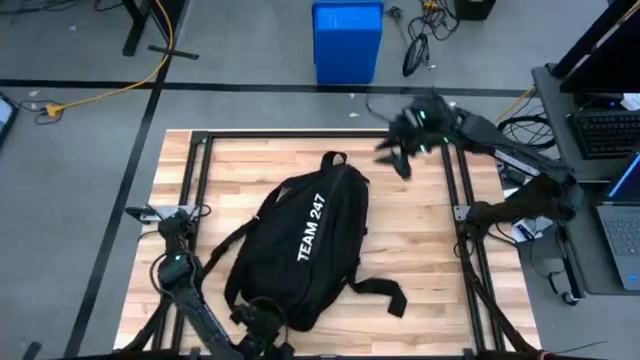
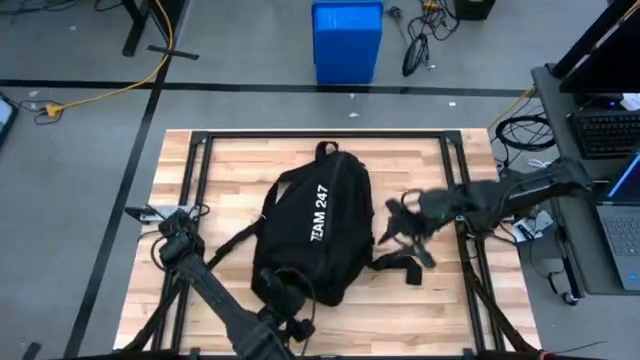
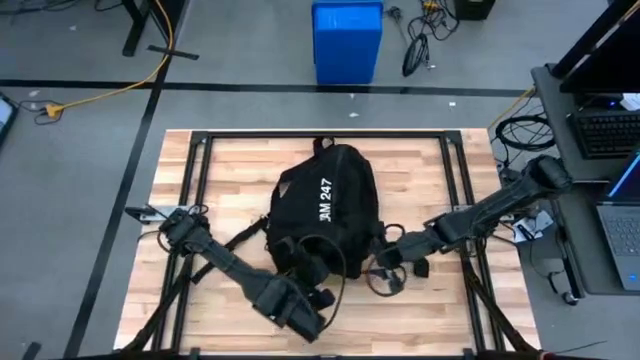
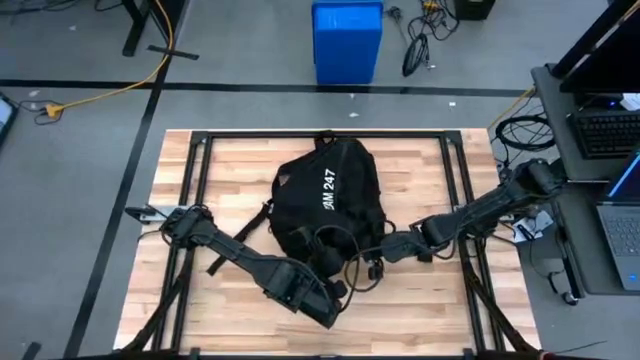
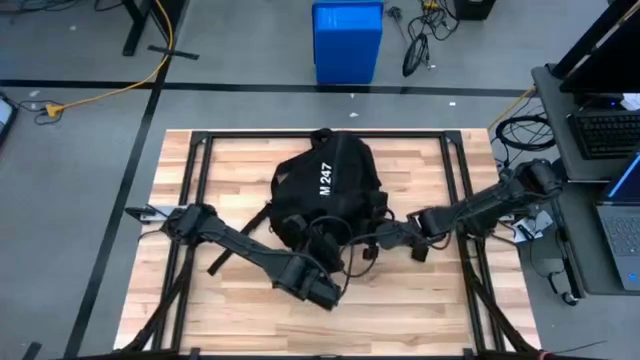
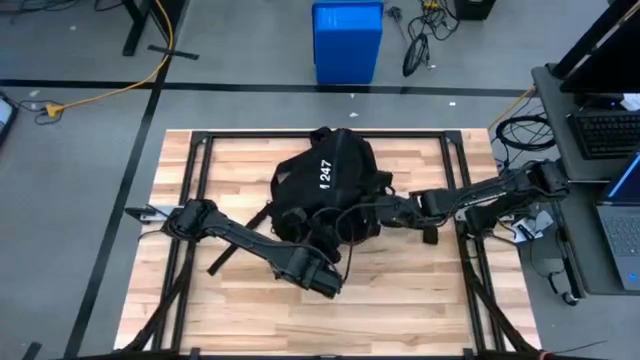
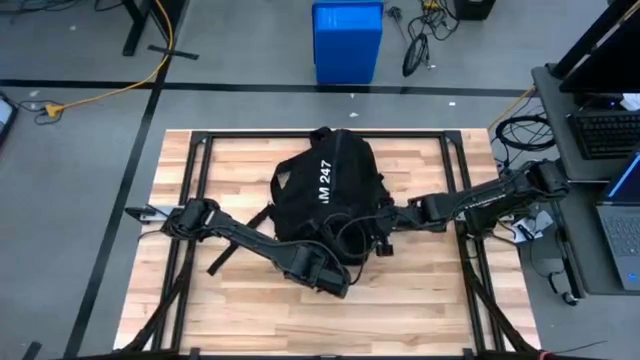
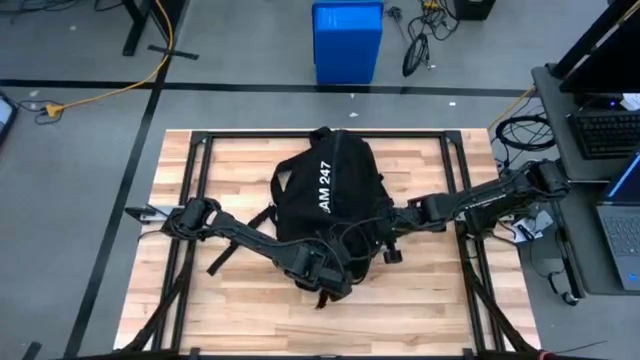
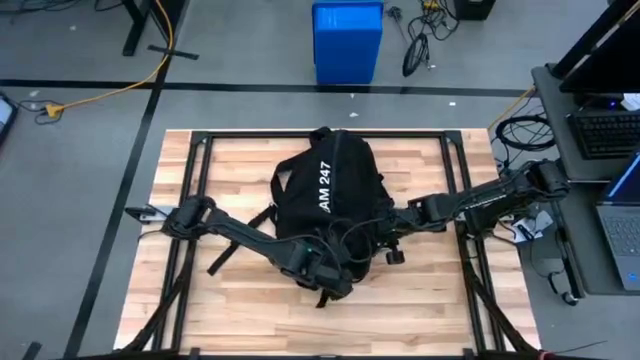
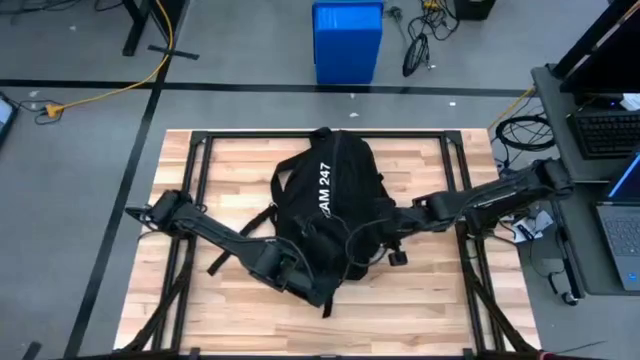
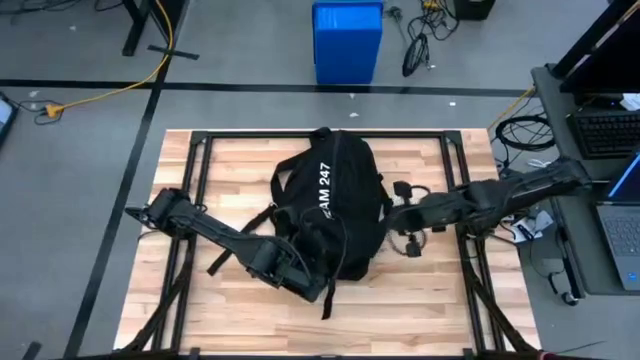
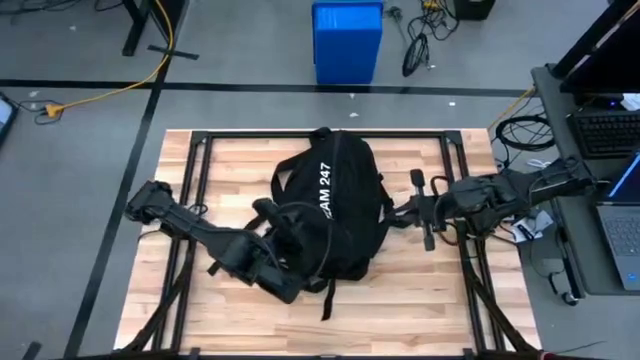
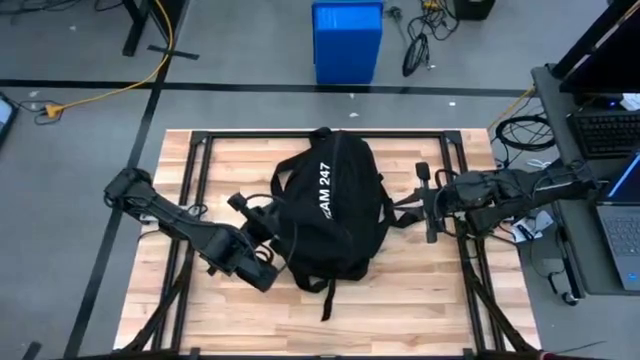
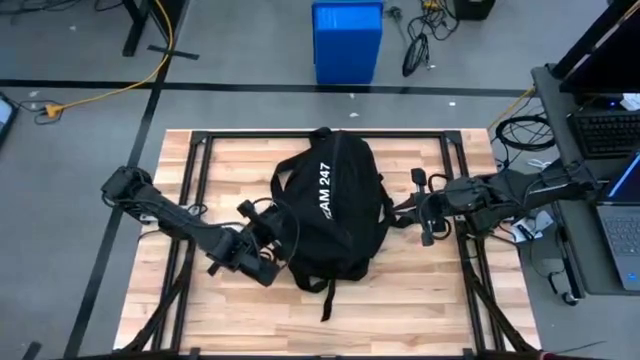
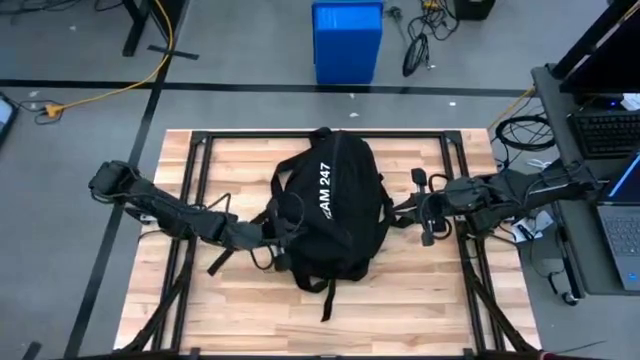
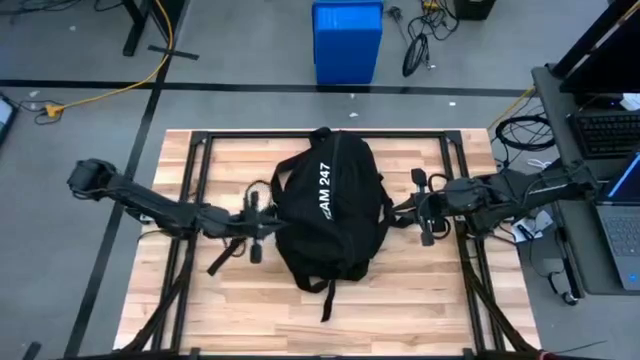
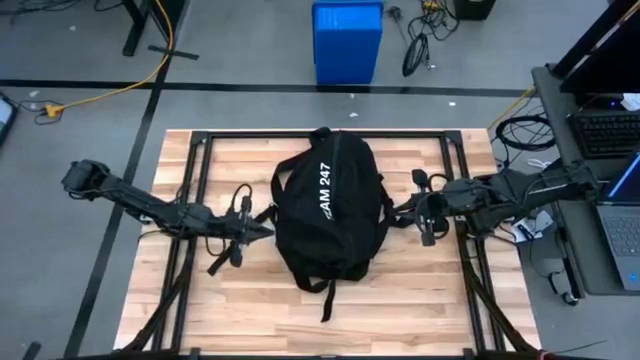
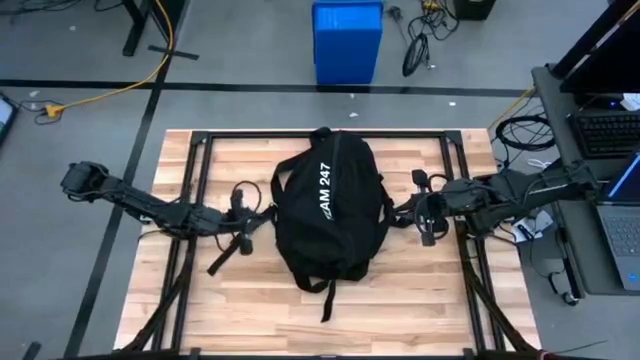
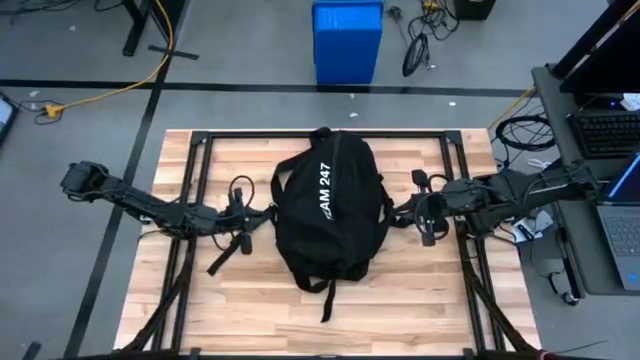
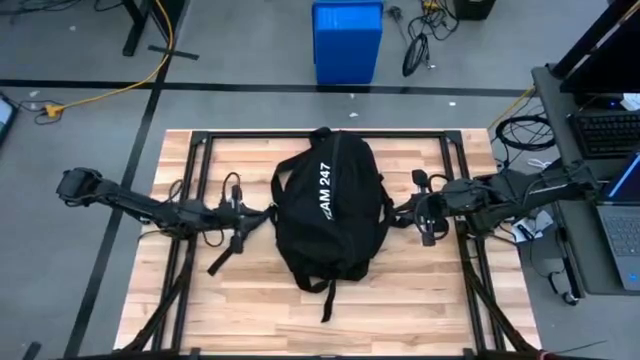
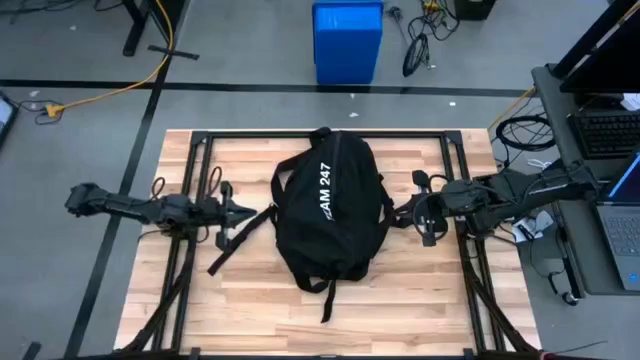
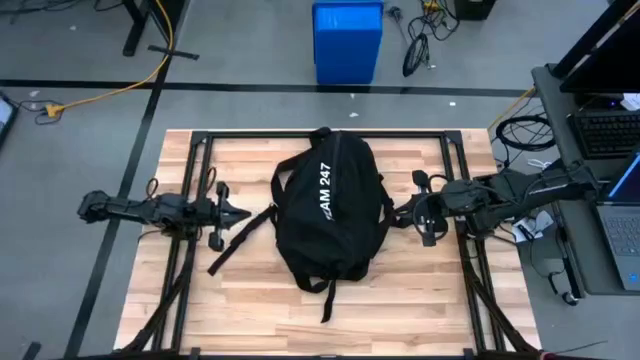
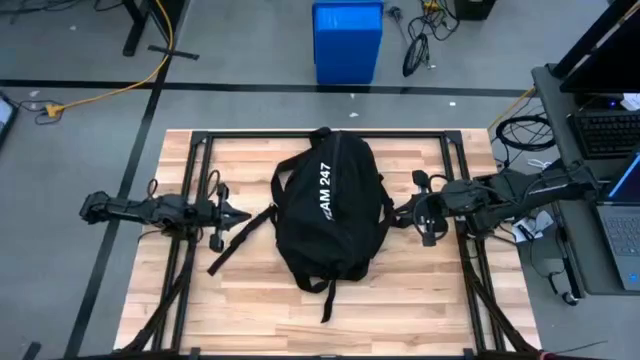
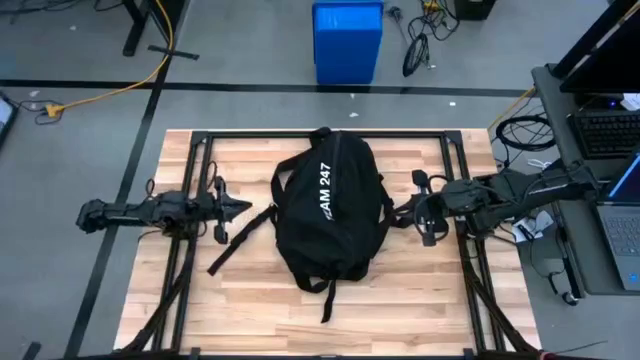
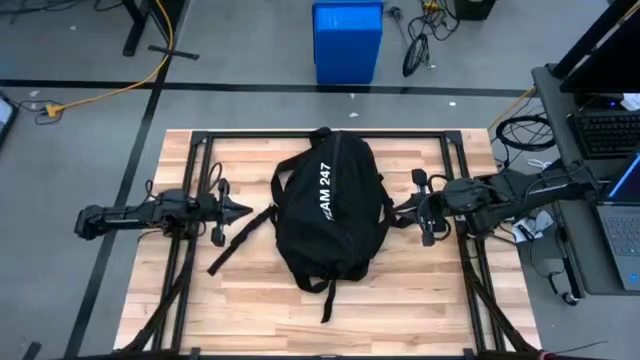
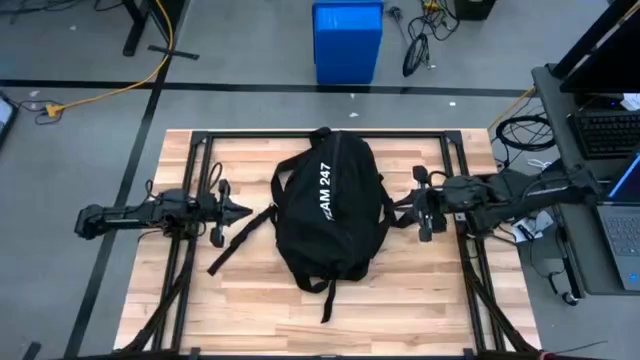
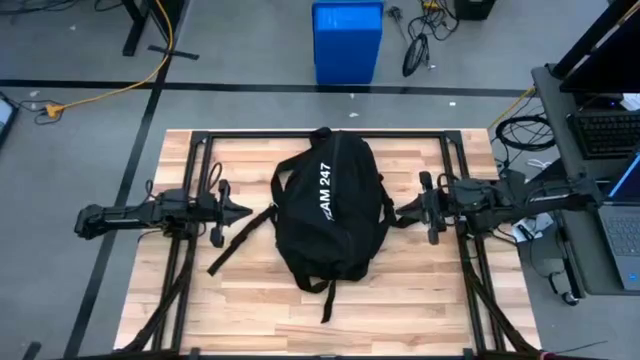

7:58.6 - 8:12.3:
Task: Unpack backpack
Return to Home Position

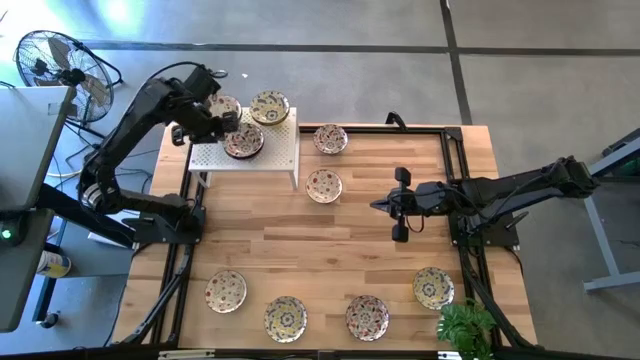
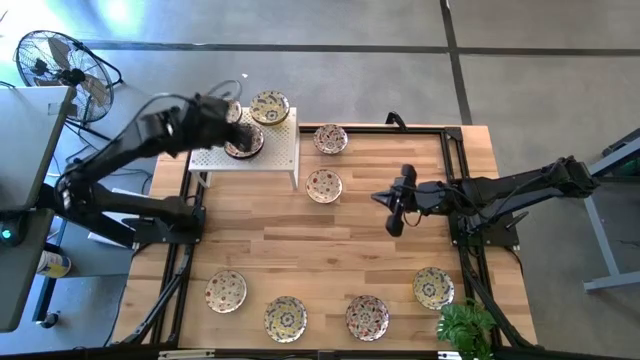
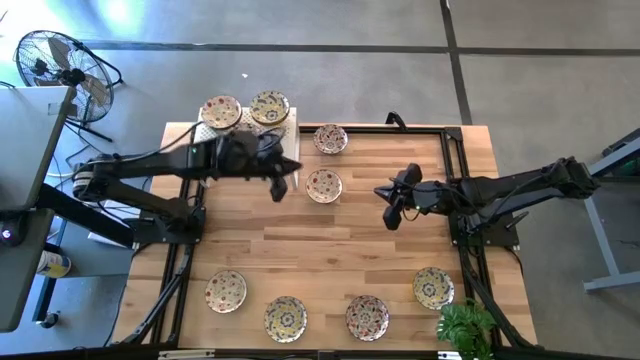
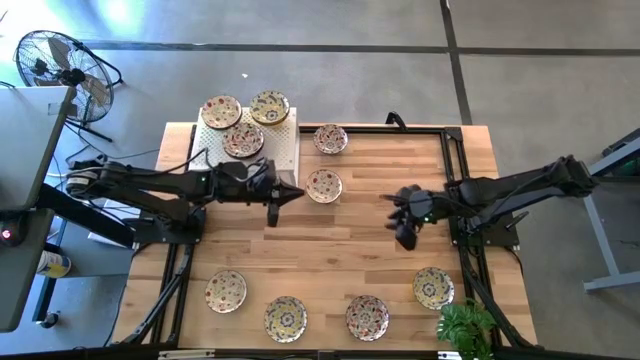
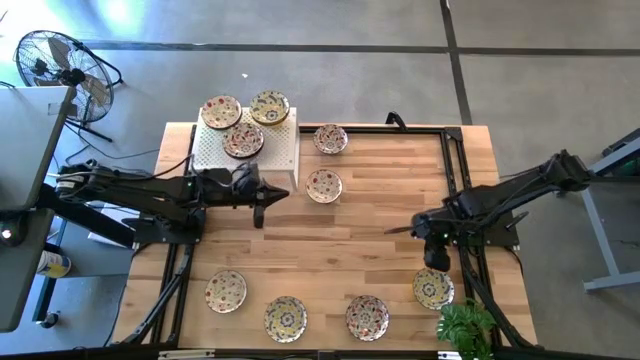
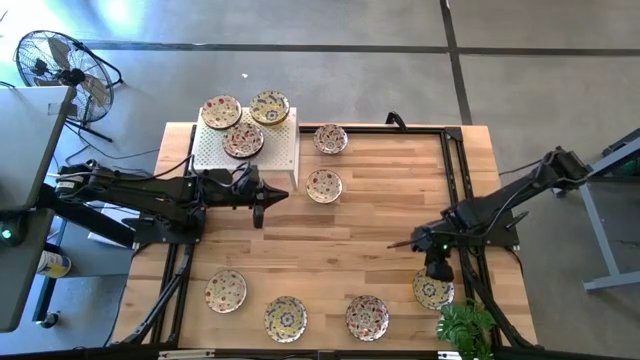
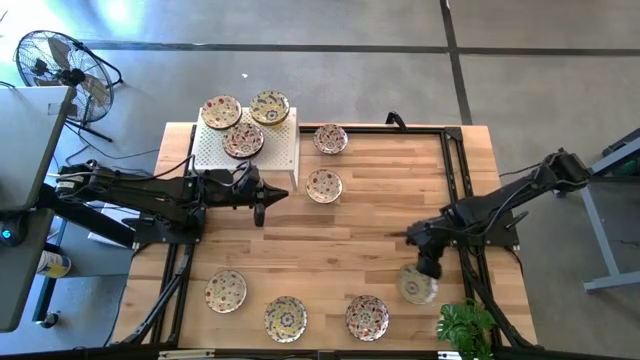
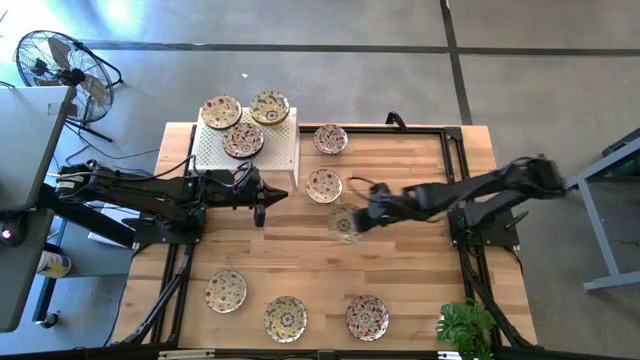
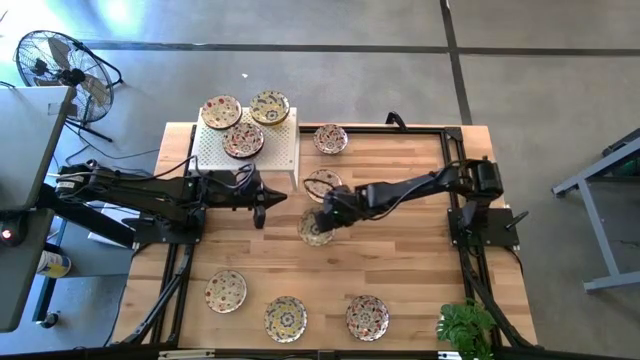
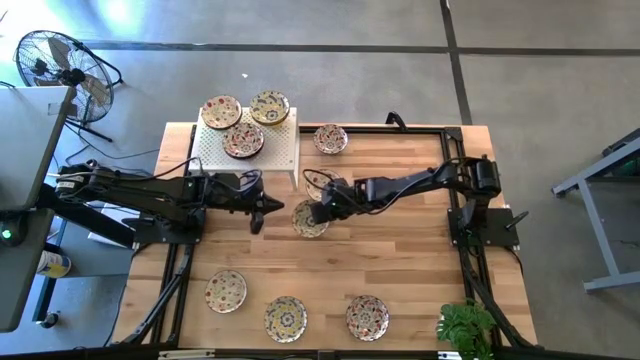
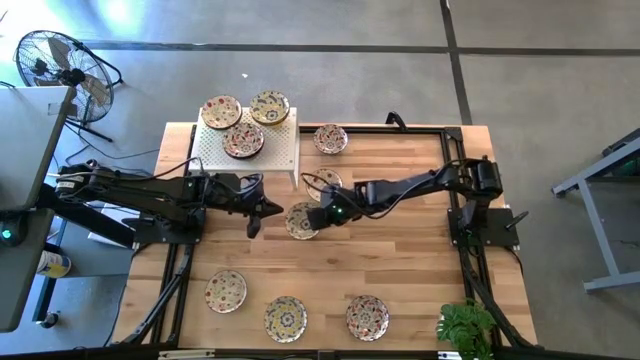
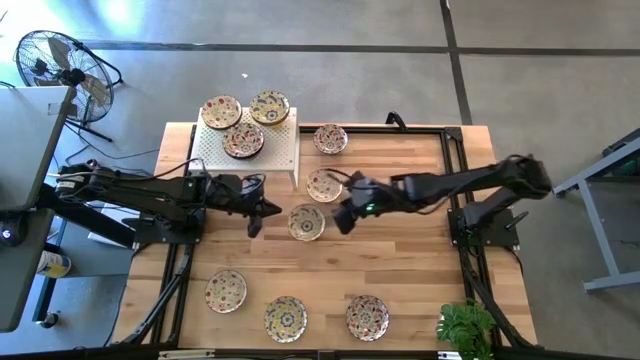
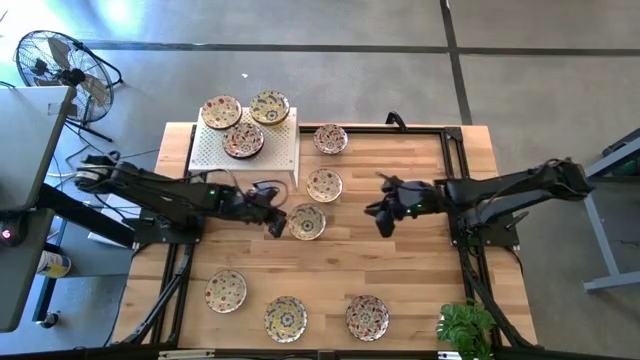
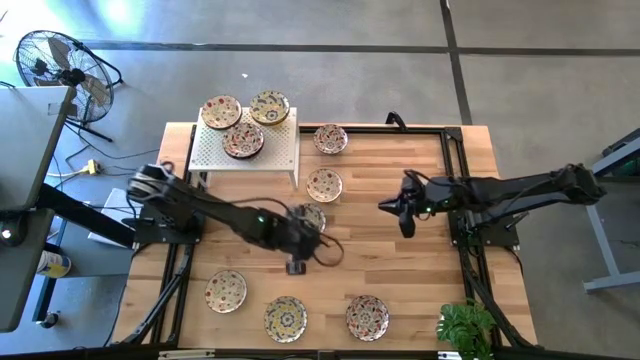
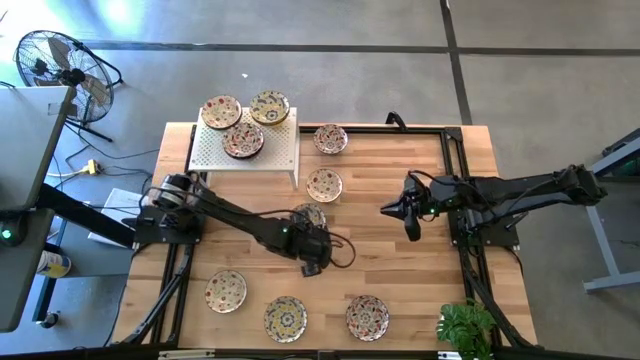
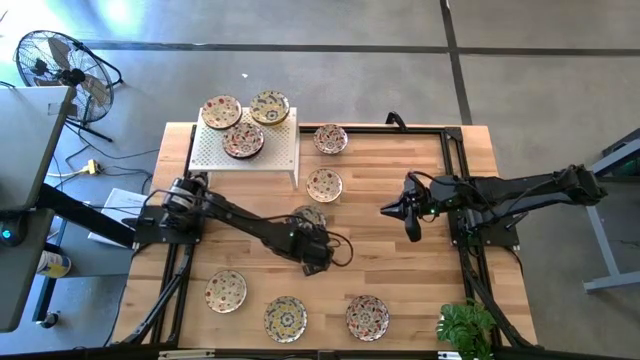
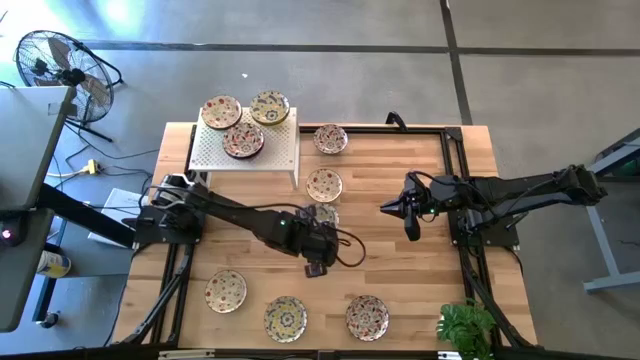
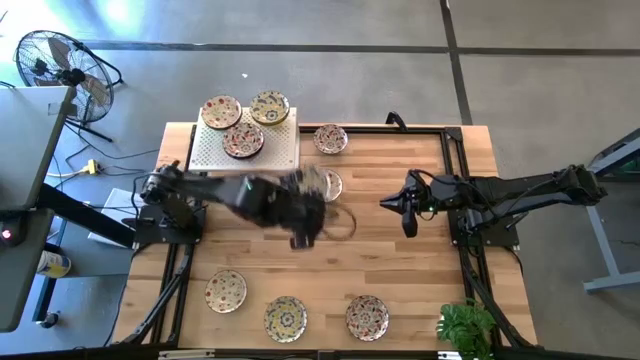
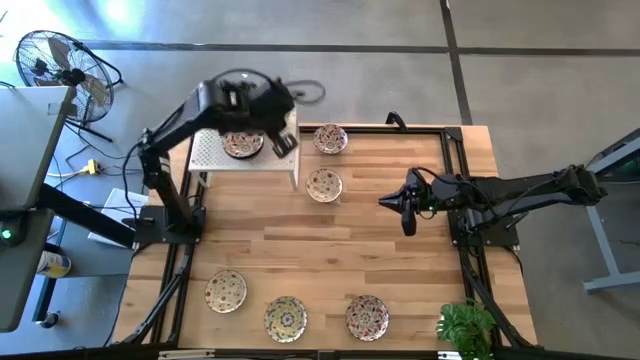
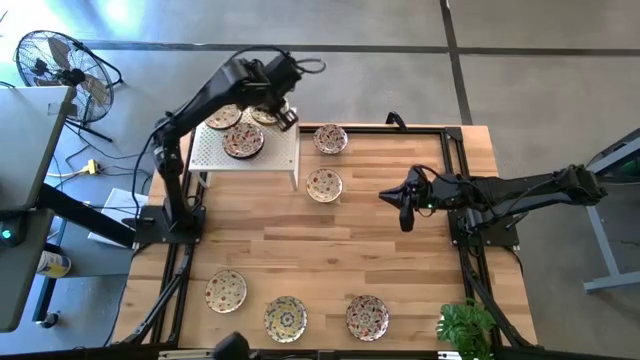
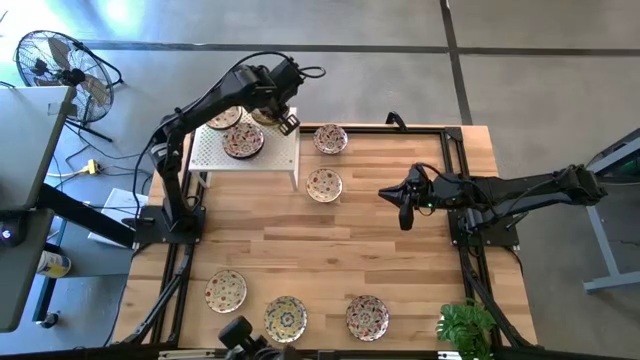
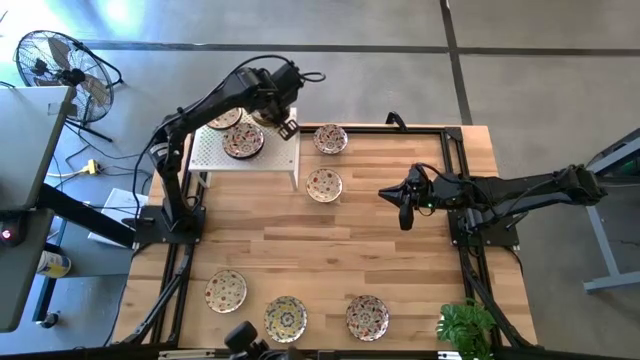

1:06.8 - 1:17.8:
Task: Pick & Place Mini bowls
Stack the yellow patterned bowl on the yellow patterned bowl on the shelf
